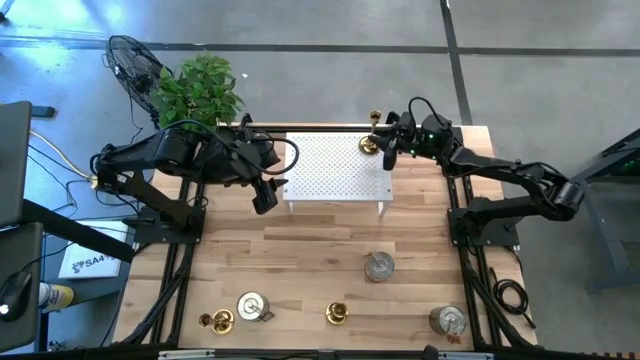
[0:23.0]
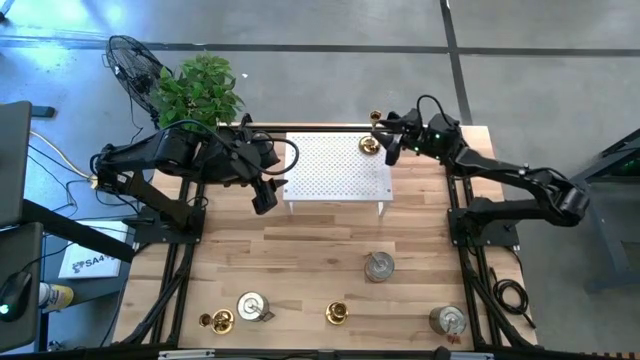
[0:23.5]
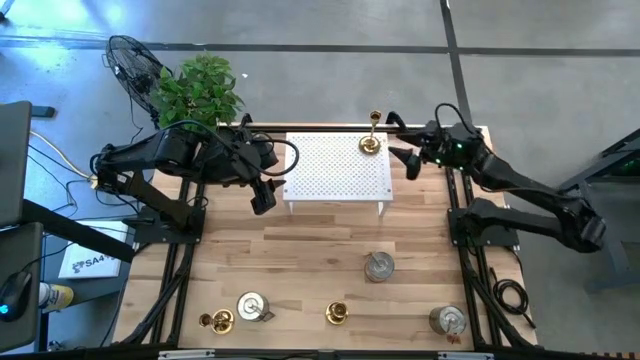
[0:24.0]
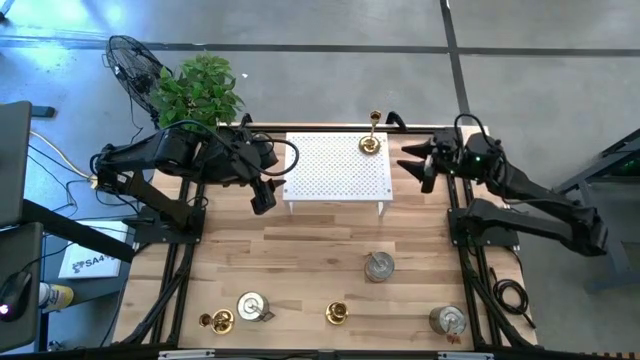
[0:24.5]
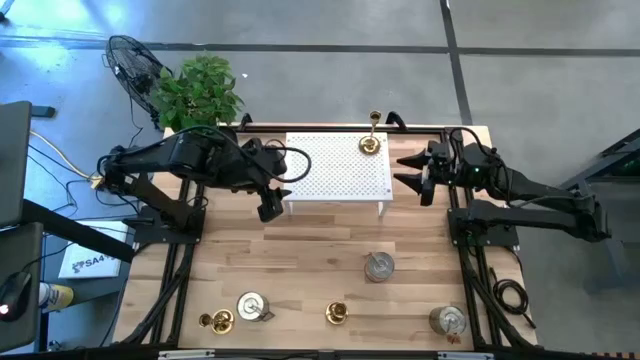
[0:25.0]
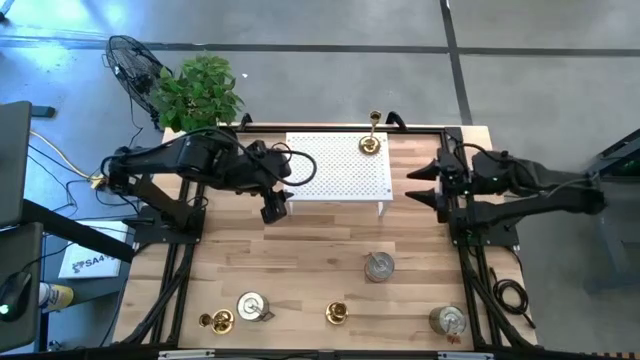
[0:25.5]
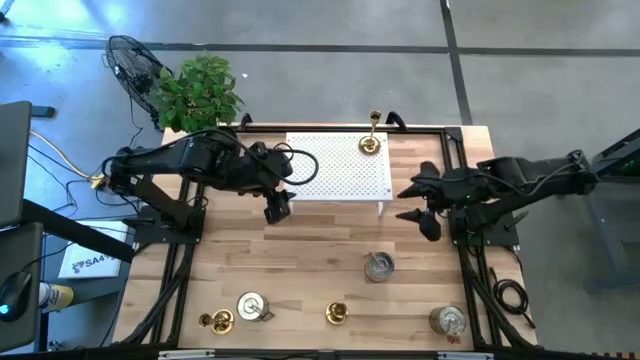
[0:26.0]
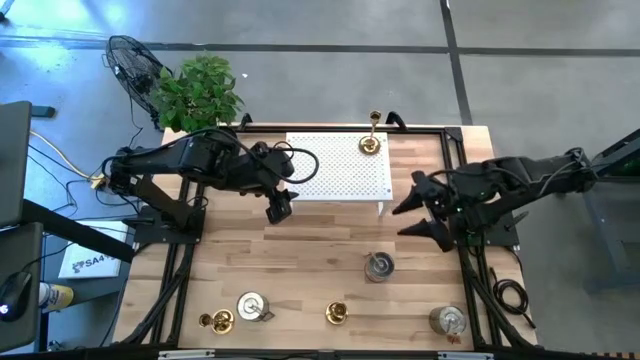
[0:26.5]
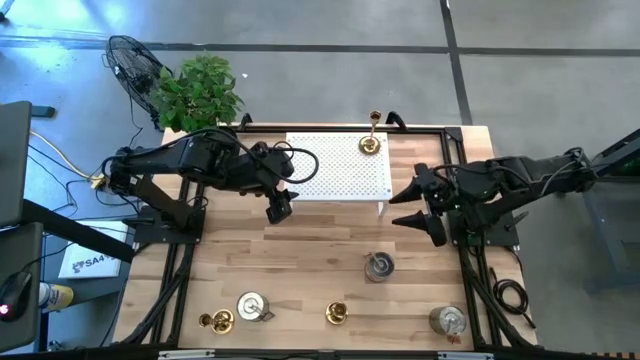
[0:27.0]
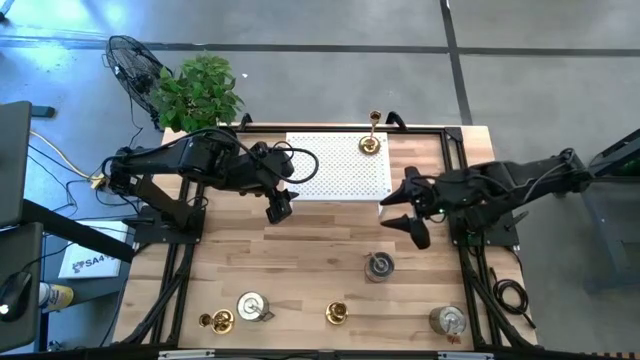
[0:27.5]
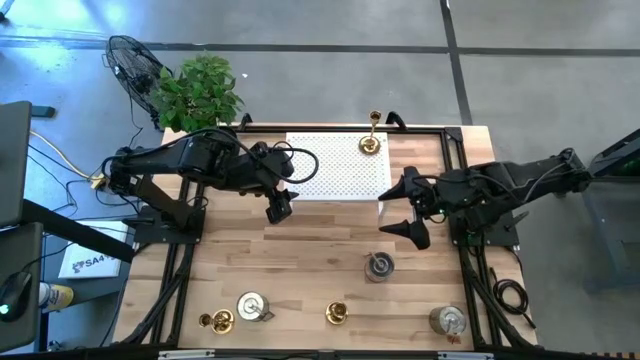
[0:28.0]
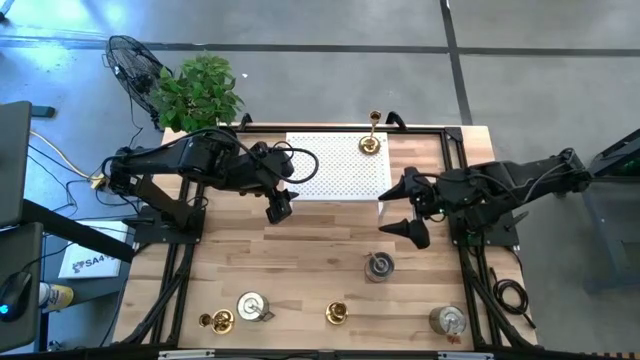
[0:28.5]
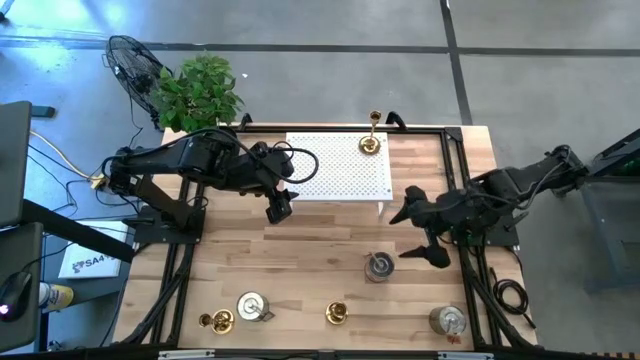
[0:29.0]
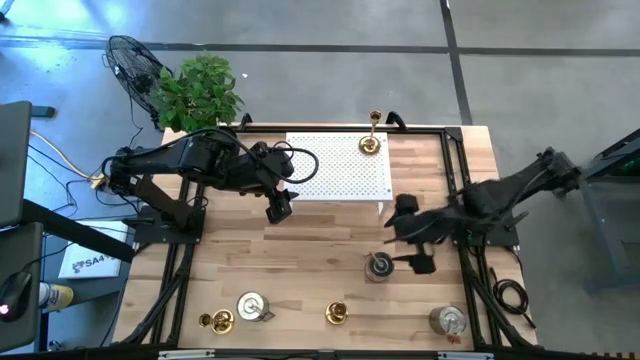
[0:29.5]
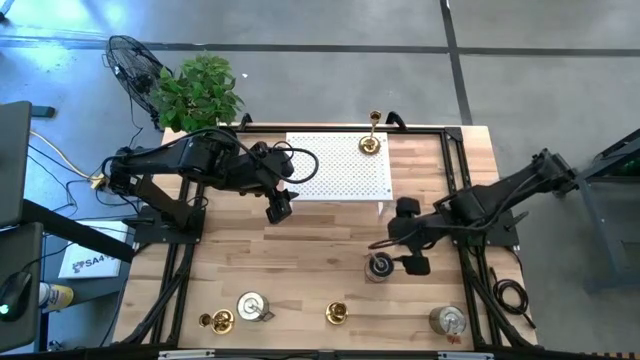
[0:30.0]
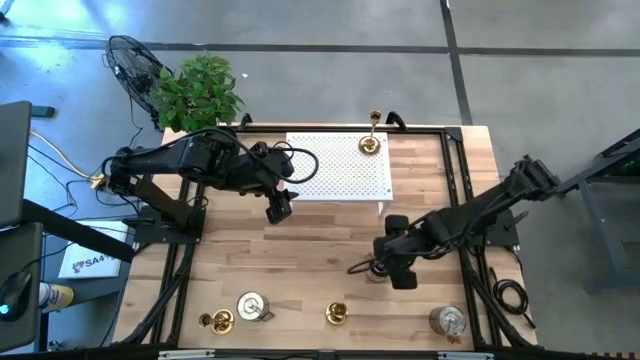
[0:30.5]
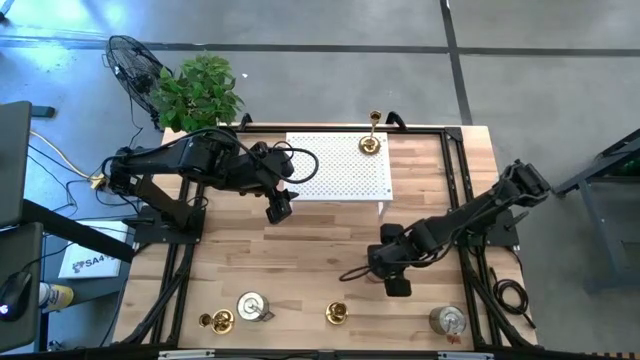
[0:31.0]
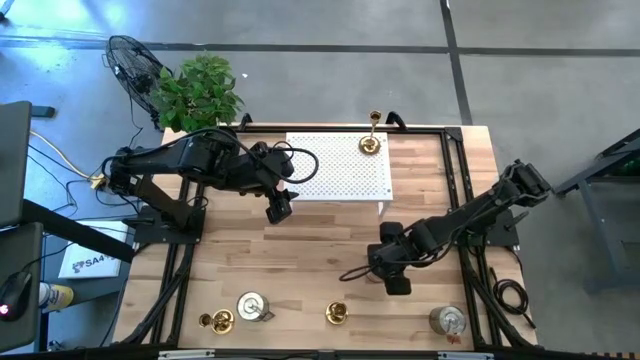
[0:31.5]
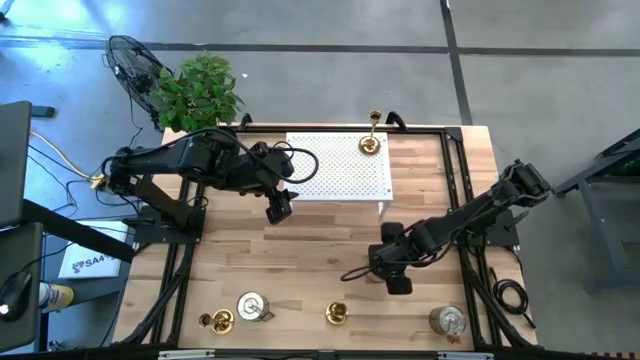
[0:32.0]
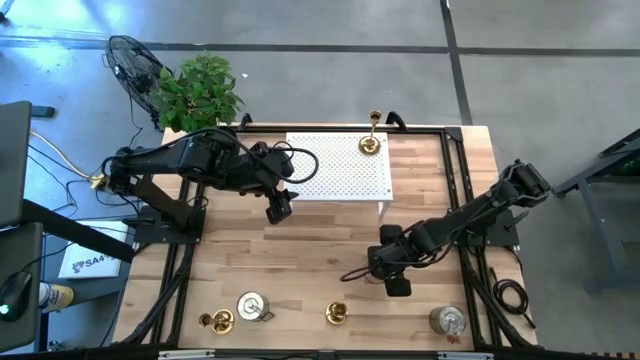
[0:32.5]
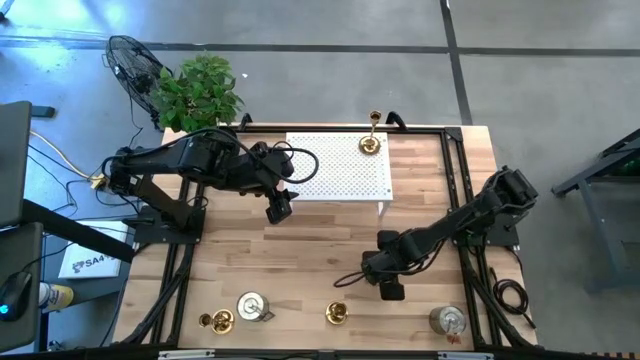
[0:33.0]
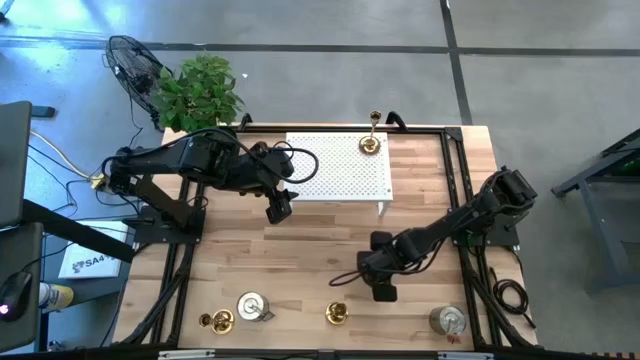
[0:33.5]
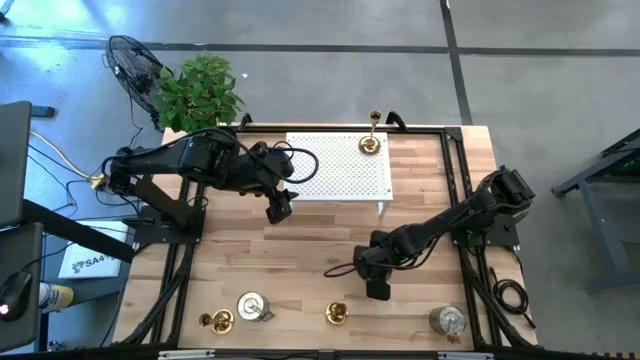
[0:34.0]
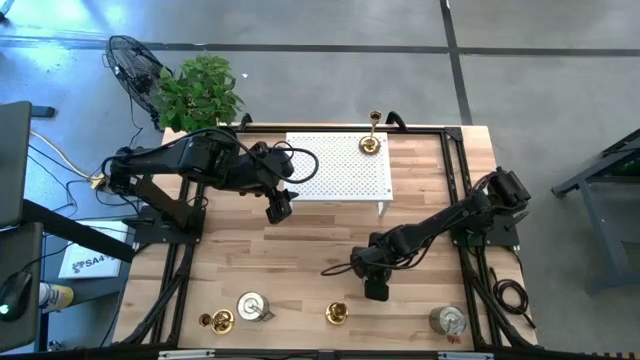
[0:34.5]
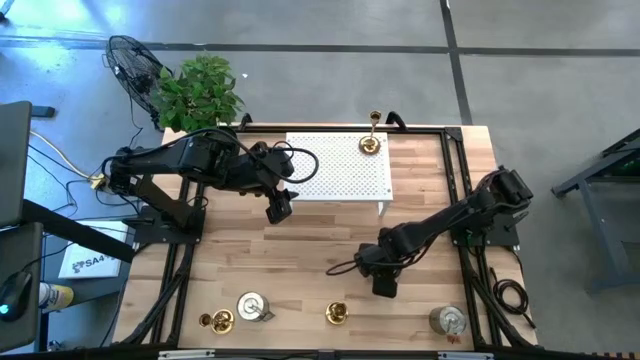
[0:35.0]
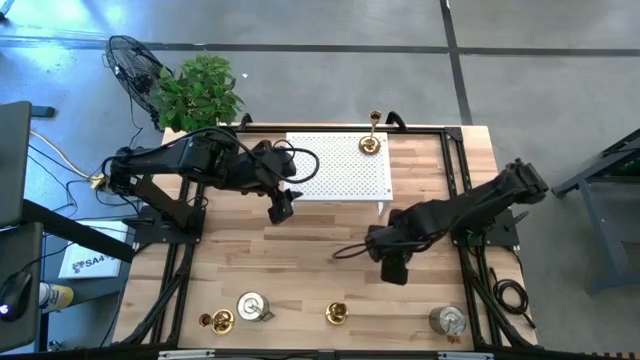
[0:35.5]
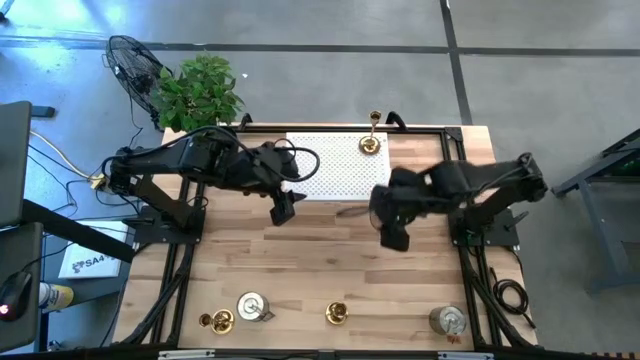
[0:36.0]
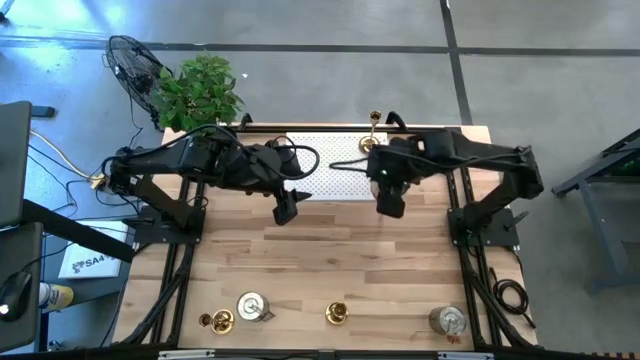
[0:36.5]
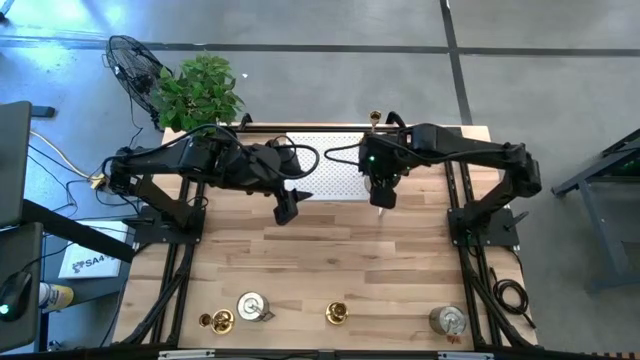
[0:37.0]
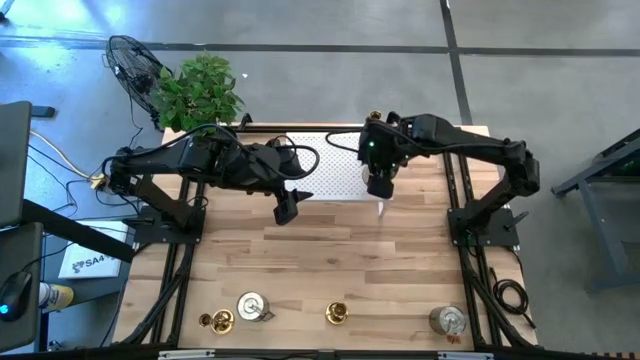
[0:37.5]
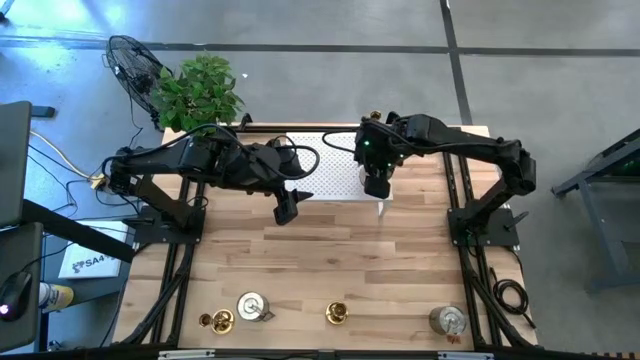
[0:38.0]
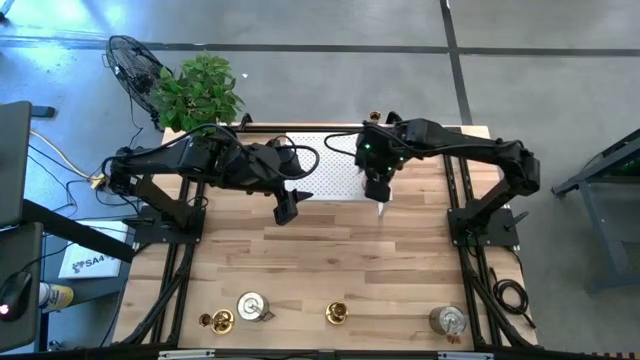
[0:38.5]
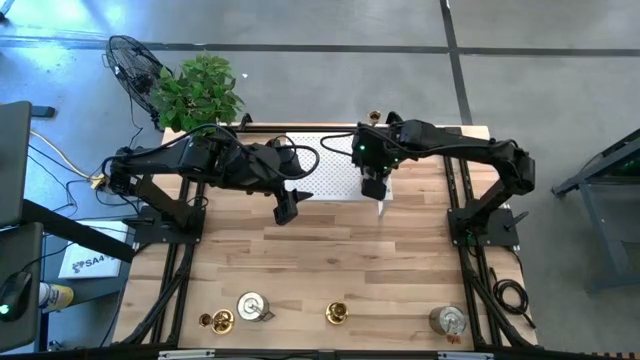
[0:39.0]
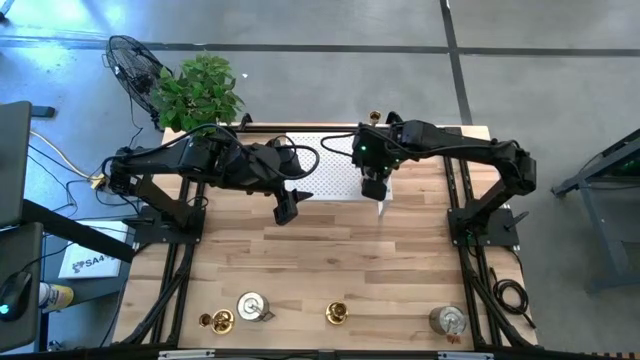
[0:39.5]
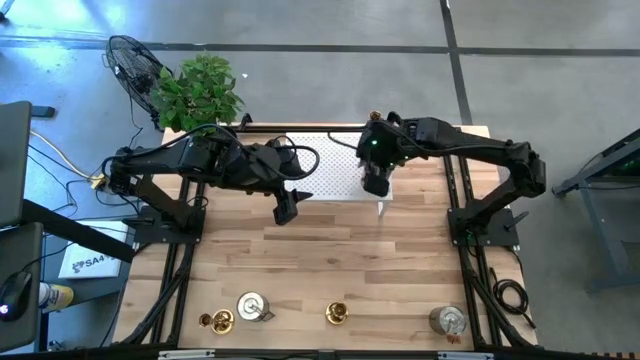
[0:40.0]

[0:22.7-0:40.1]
Task: Pick & Place candle stick holders
Put the top silver scented candle on the shelf

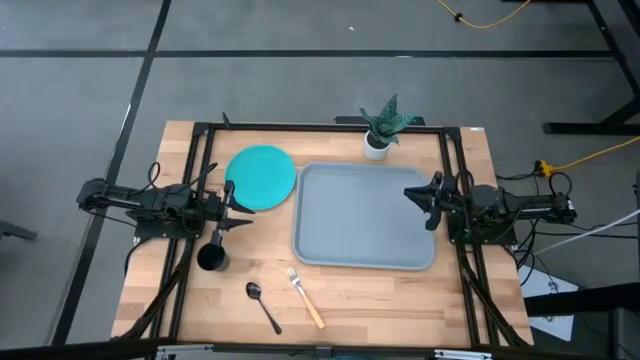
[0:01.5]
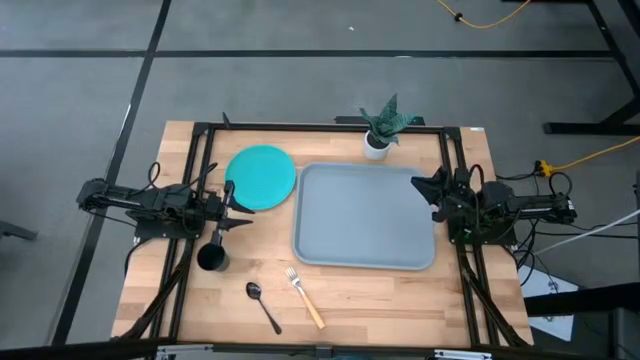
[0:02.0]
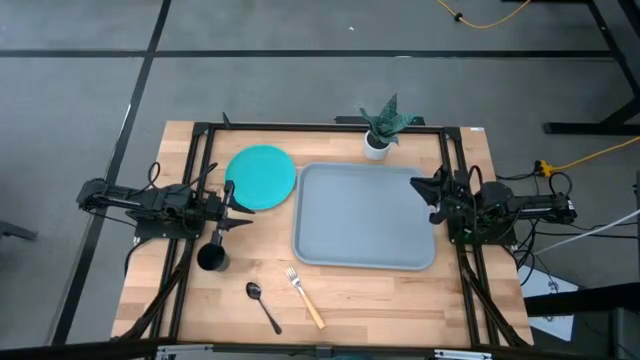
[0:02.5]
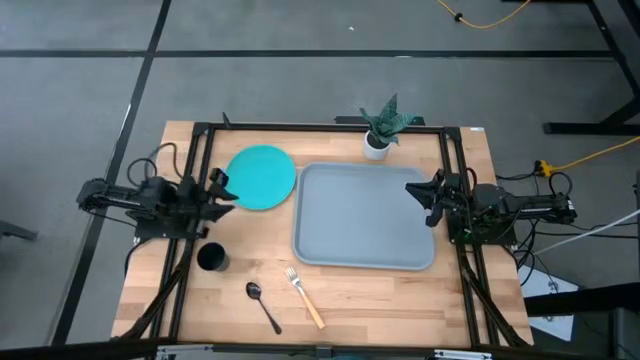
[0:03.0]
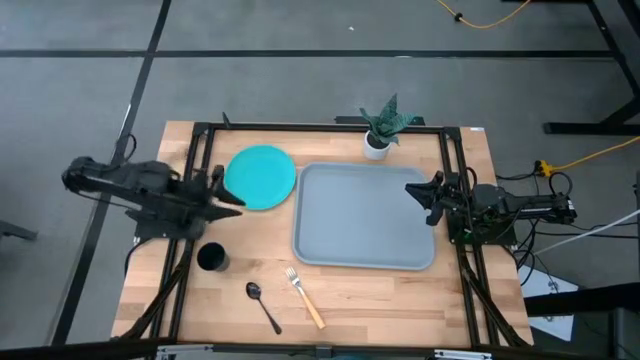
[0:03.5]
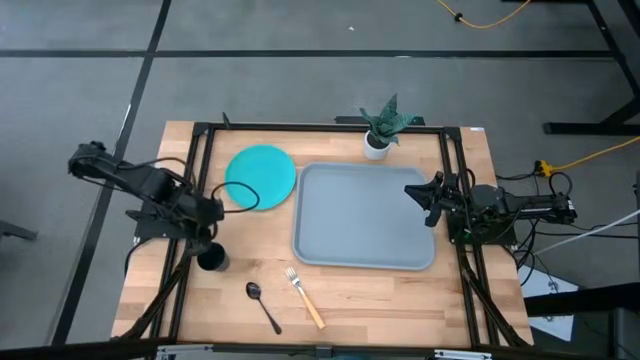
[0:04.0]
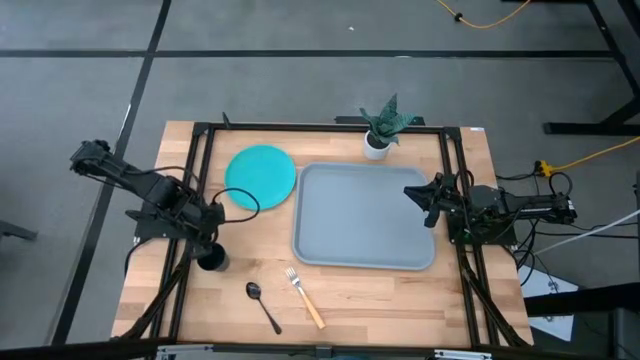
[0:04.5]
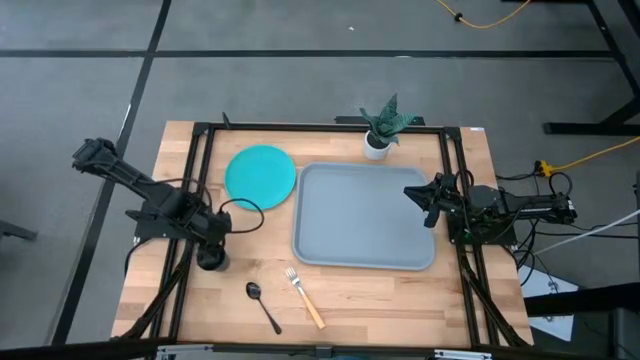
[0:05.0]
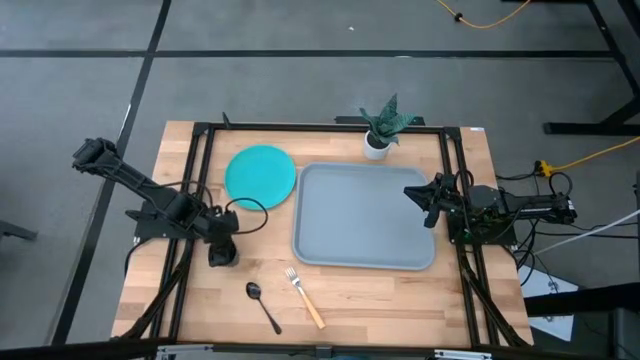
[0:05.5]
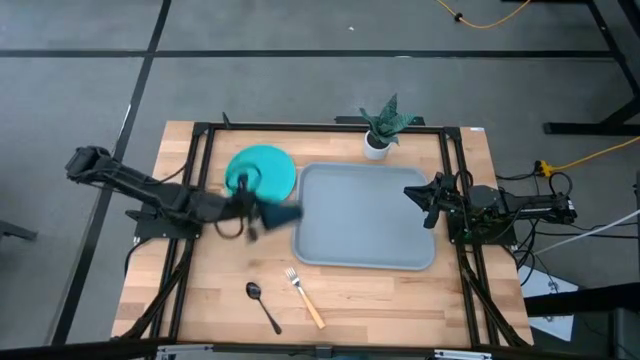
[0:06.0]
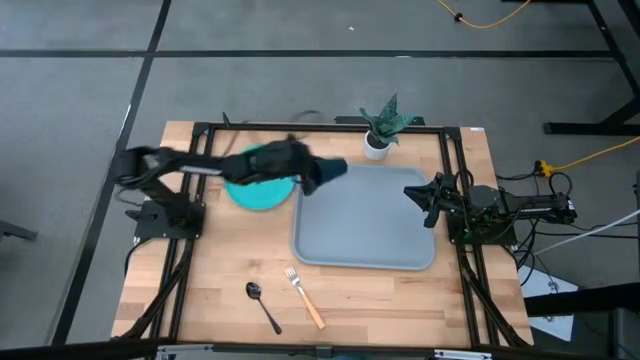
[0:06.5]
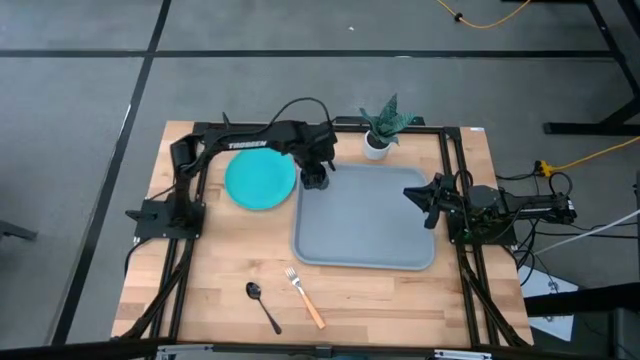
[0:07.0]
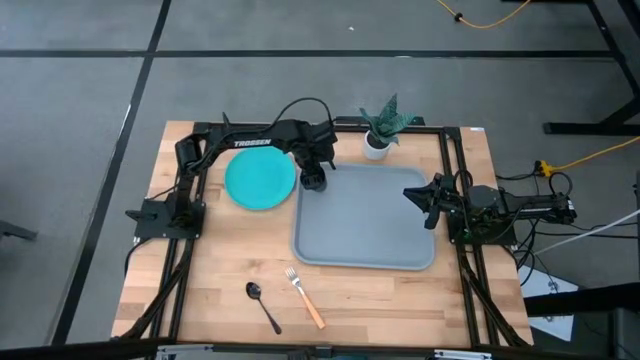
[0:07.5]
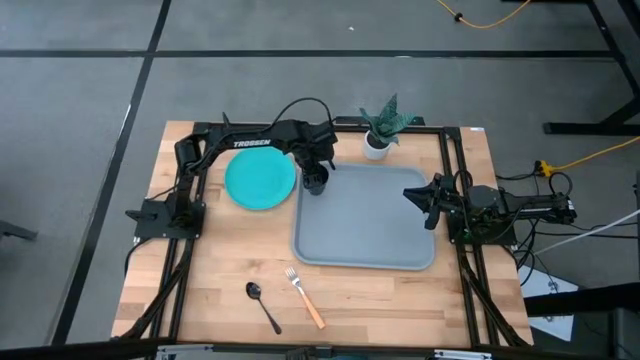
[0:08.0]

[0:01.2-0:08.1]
Task: Pick and place plate/cup/fork/spoon on tray
Put the black cup to the top left of the grey tray
